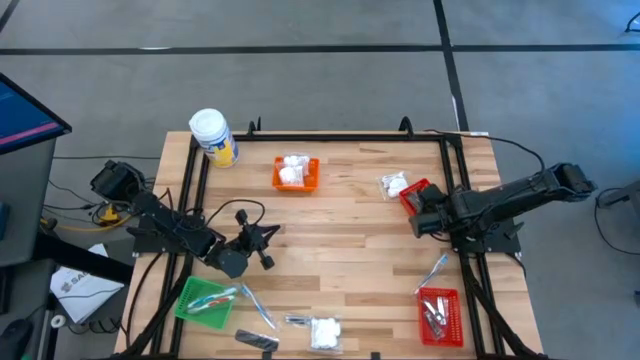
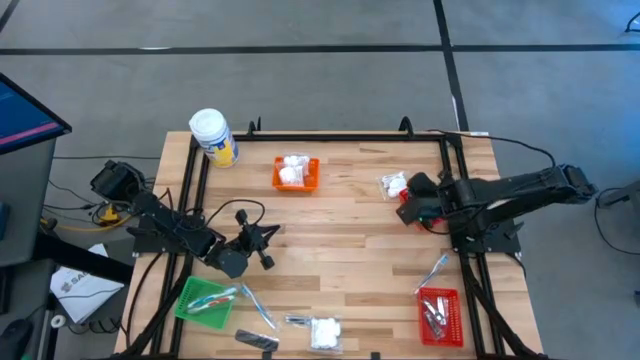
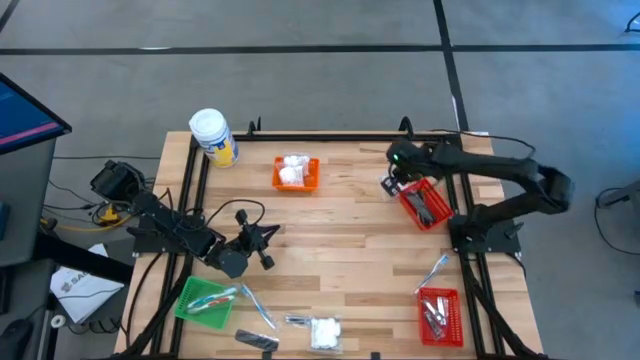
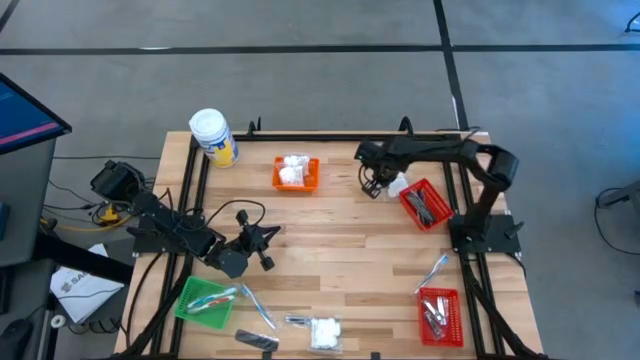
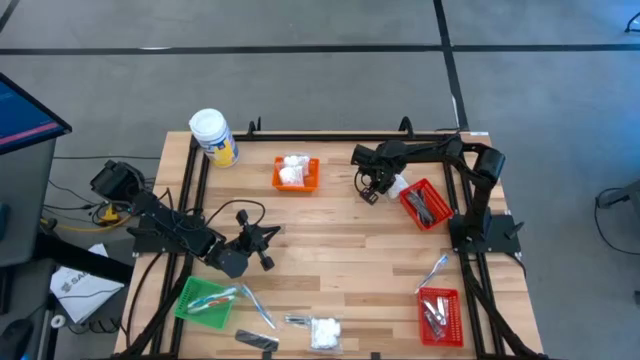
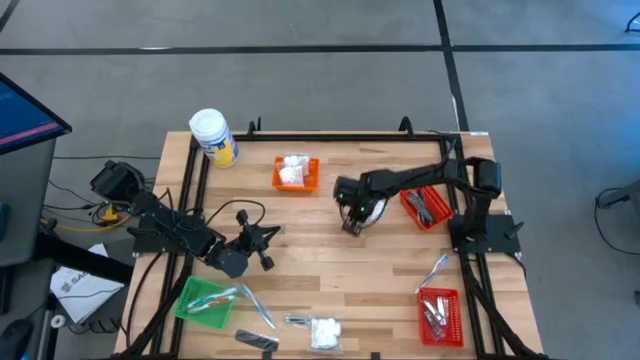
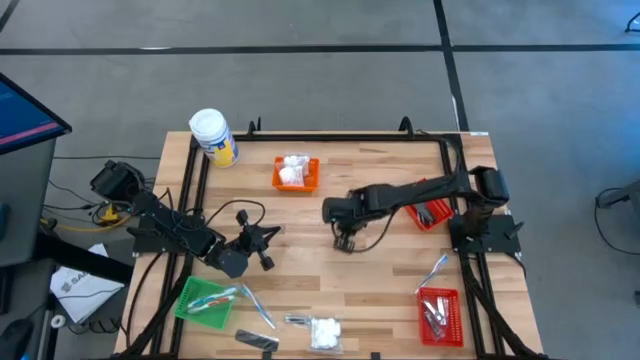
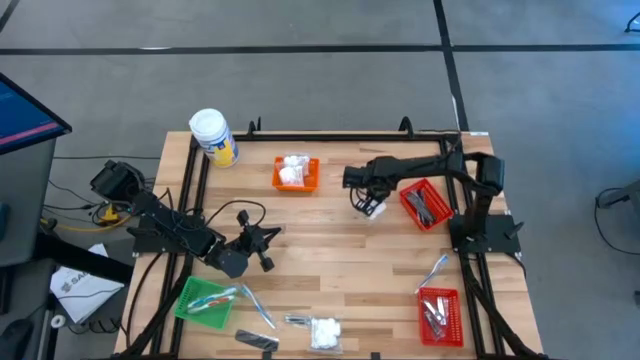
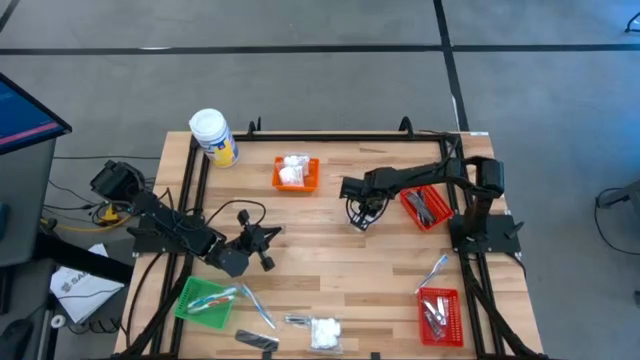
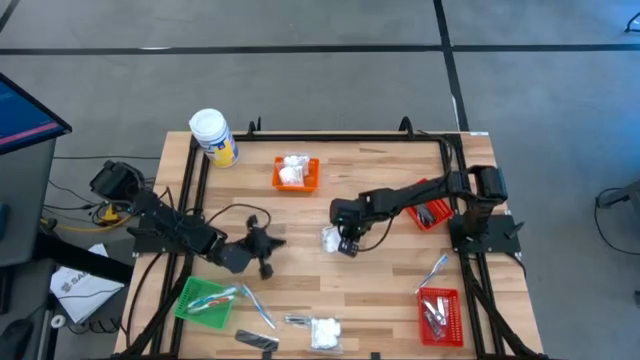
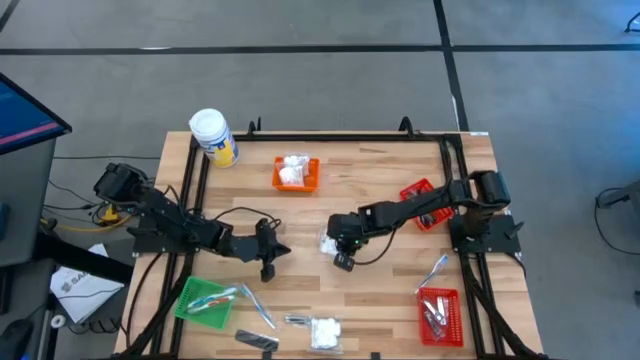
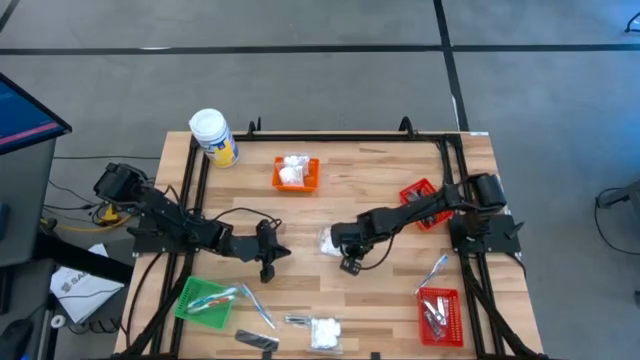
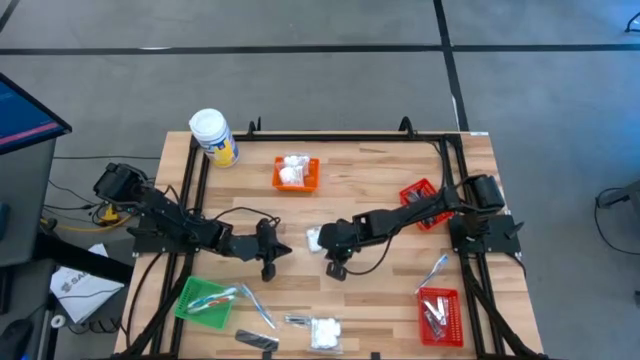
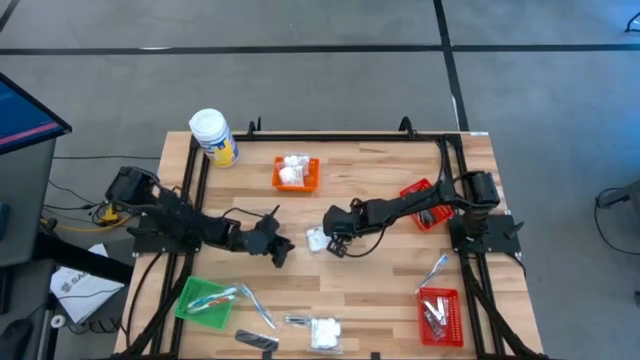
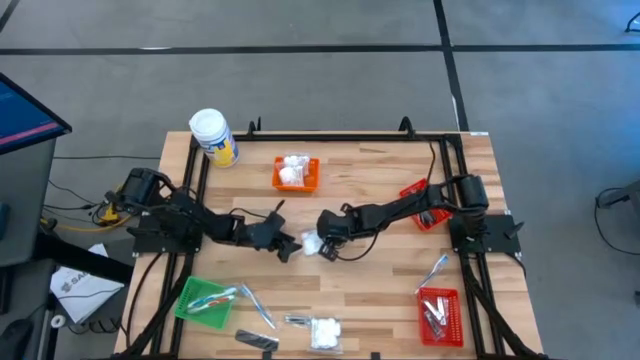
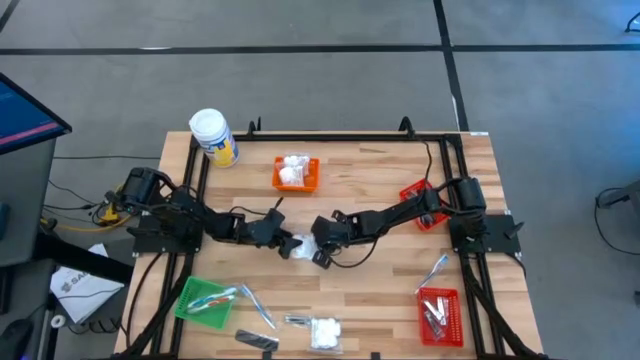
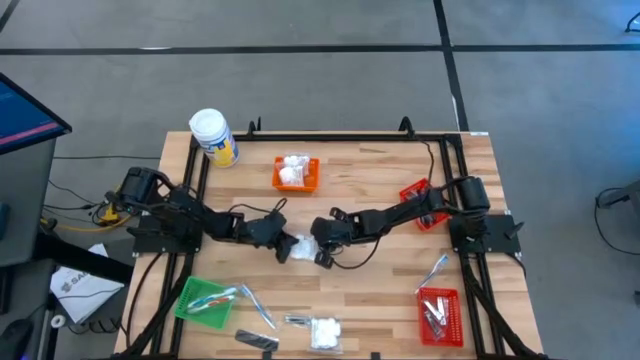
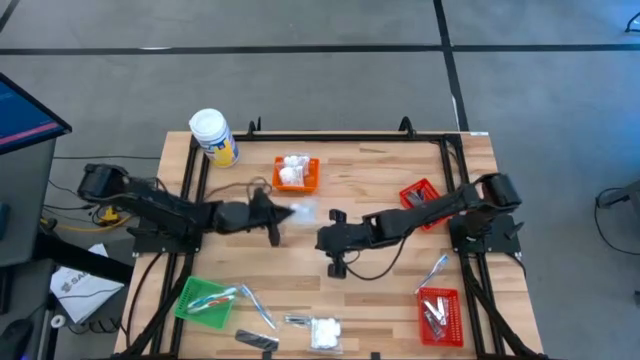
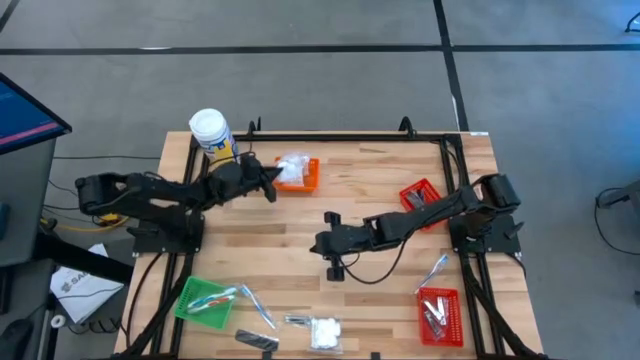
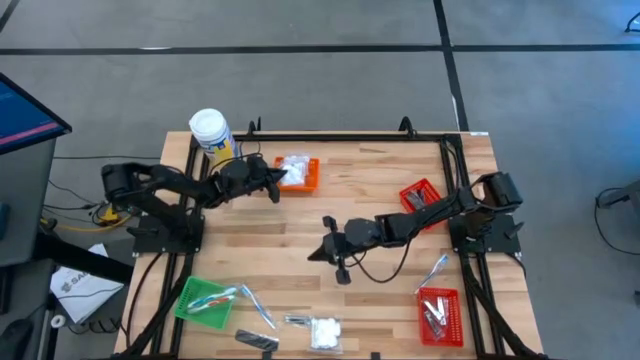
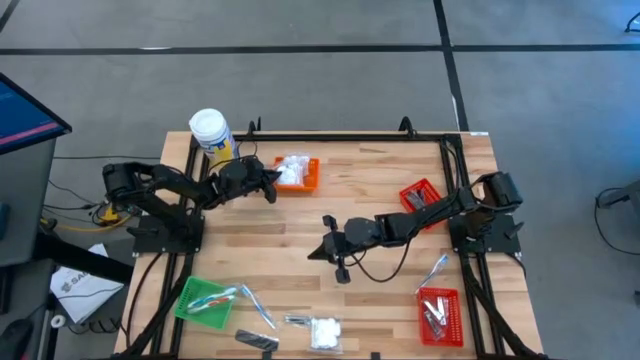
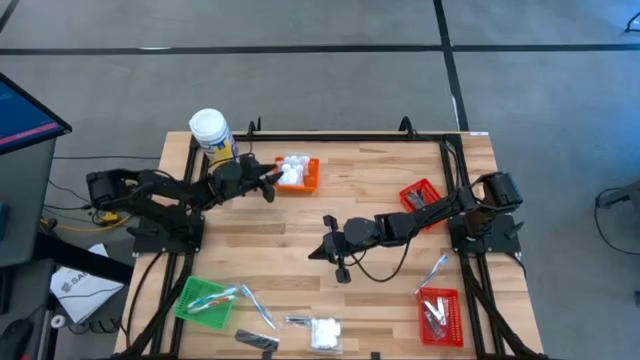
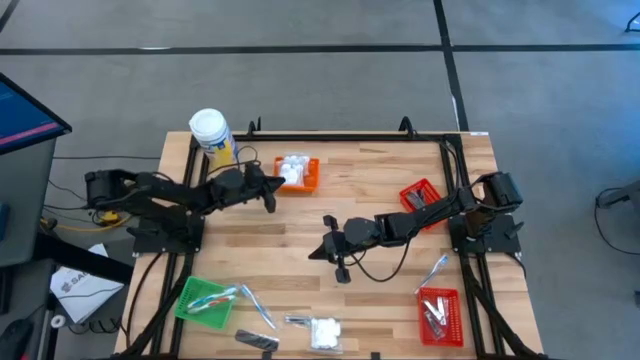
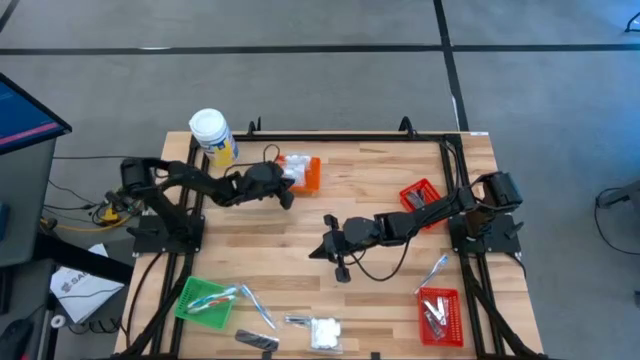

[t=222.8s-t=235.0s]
Task: Pick & Place Travel size toiletries
Put the white cotton pack into the orange basket

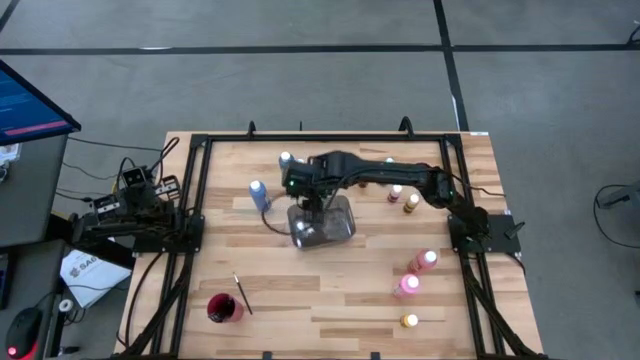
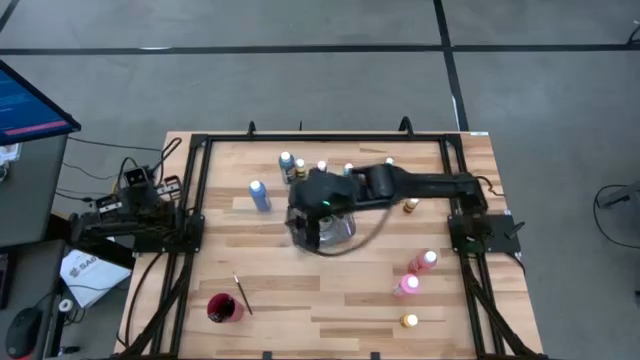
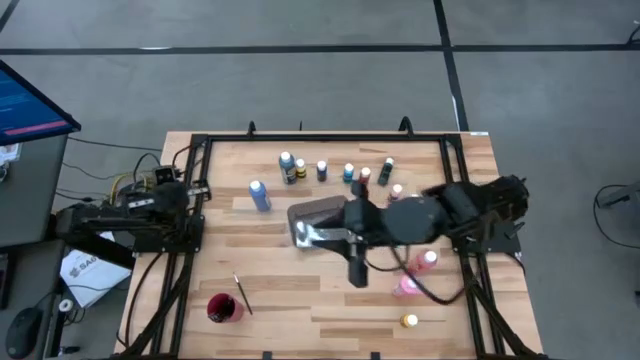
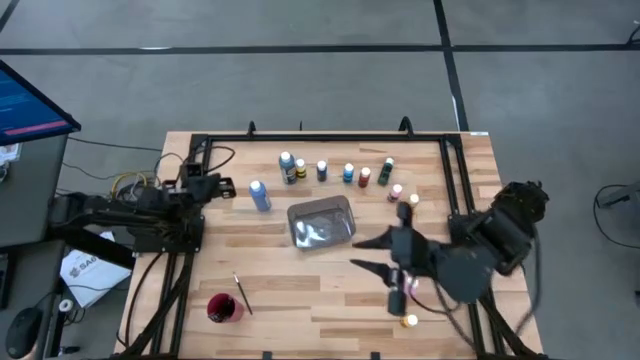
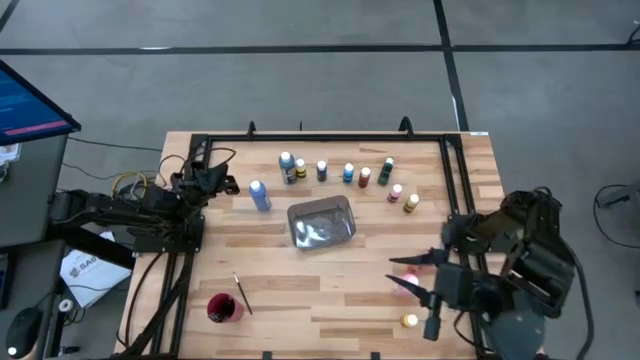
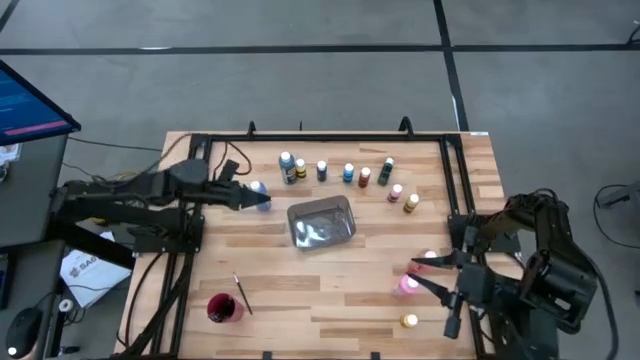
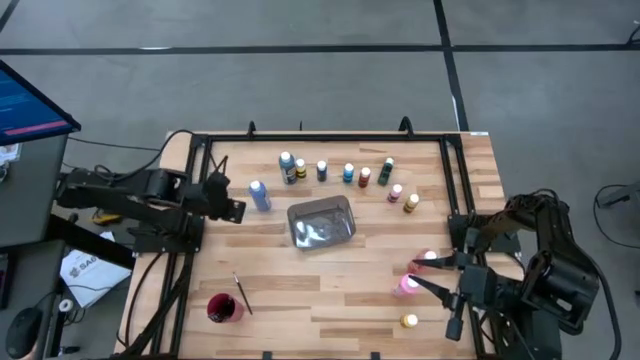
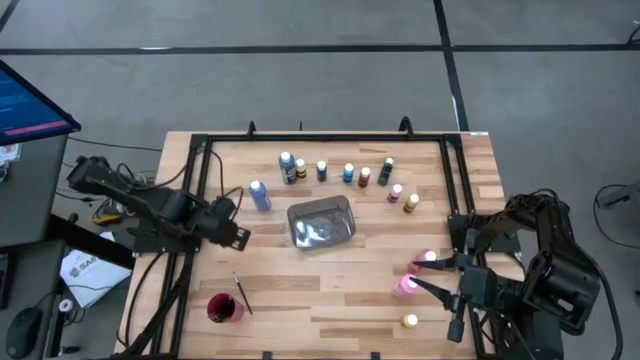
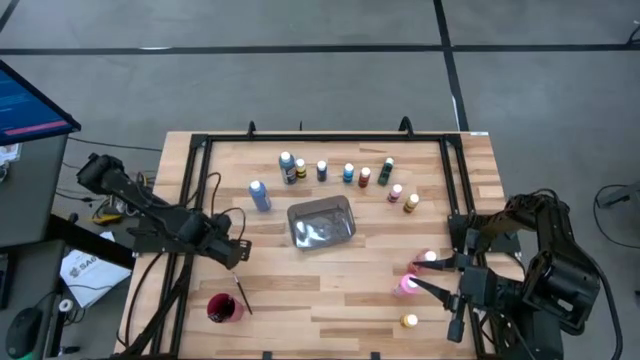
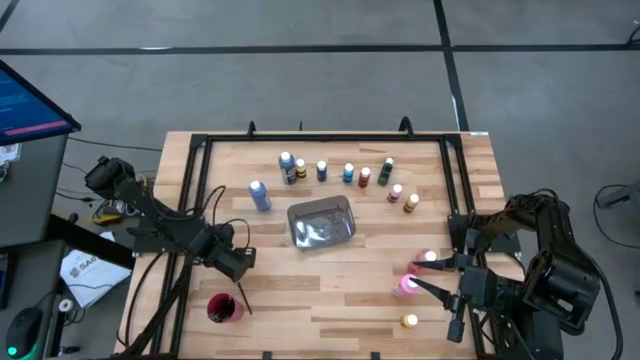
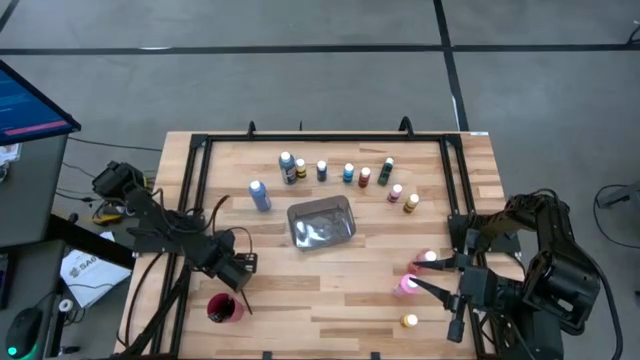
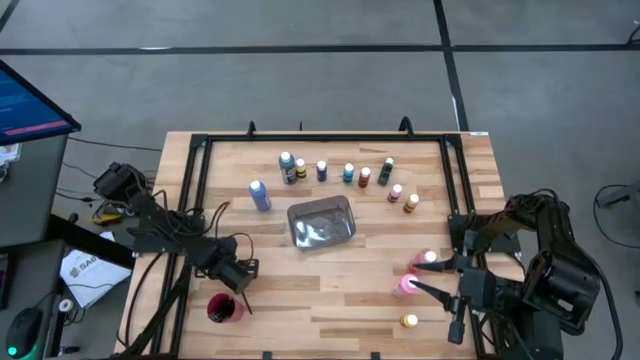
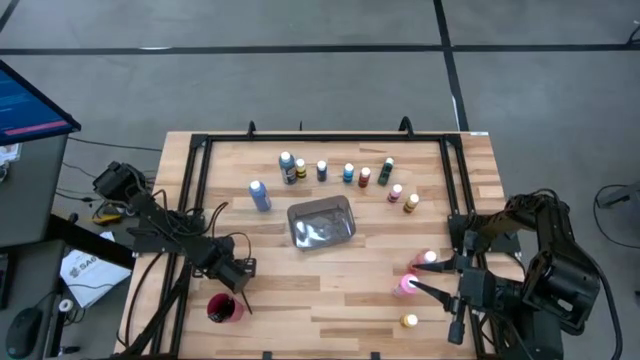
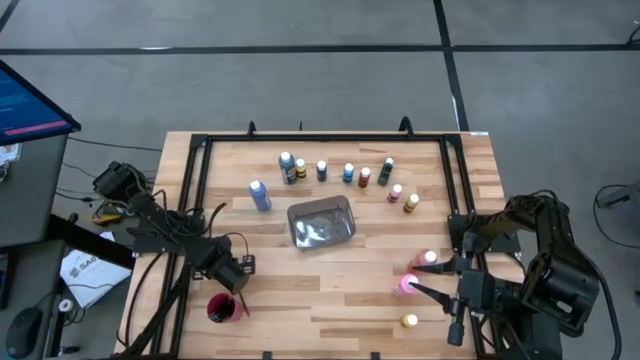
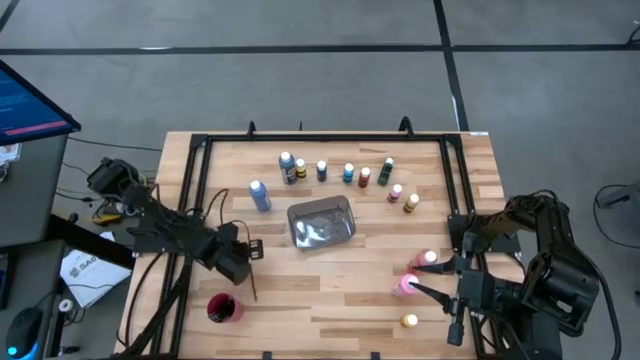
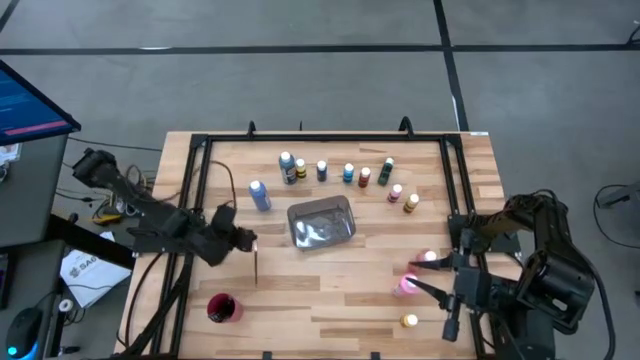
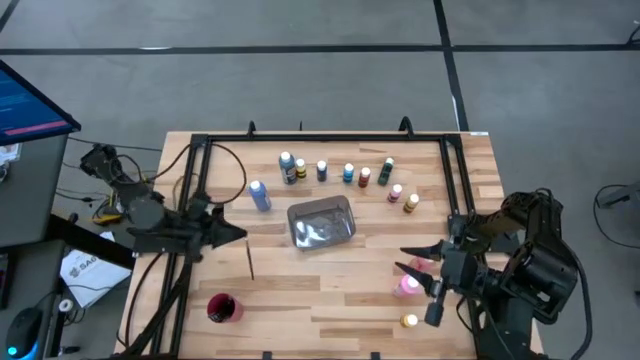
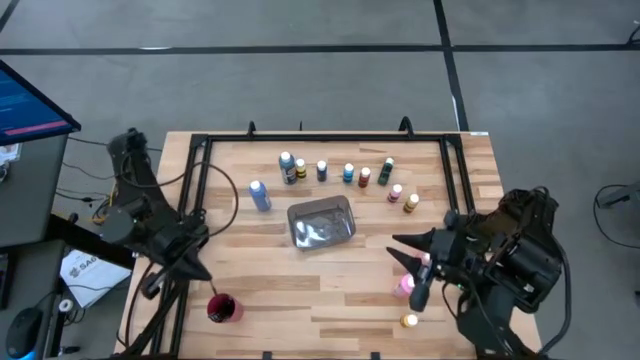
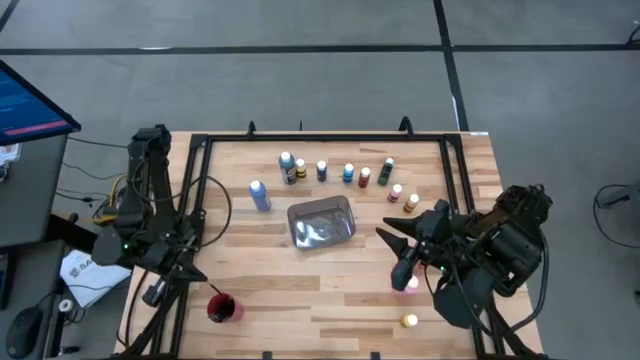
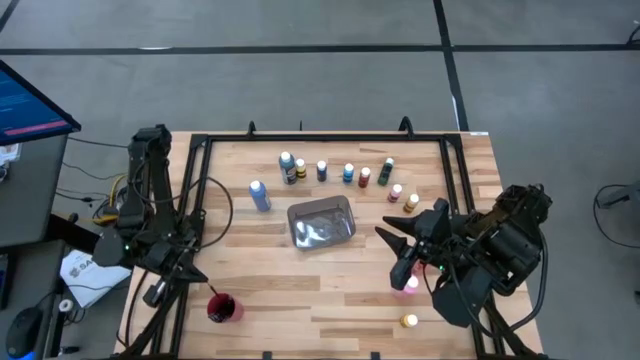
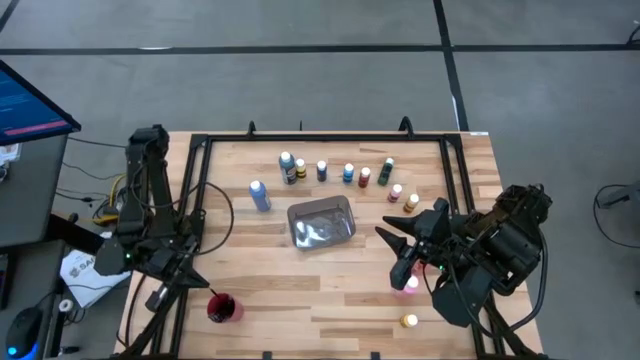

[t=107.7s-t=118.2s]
Task: Pick & Place Paint Supplies
Put the silver paintbrush into the red cup
